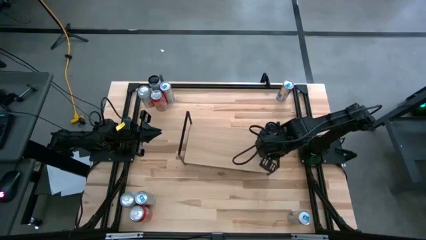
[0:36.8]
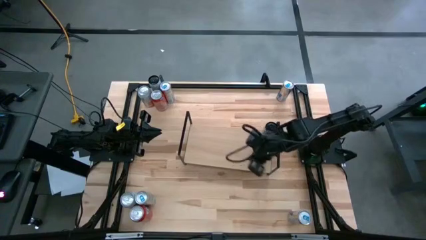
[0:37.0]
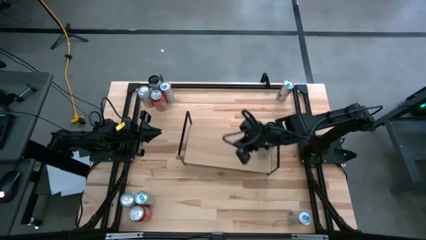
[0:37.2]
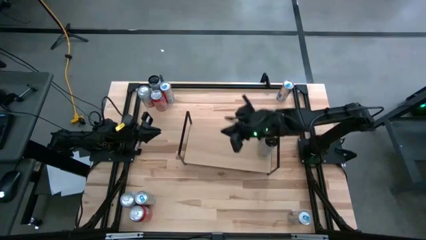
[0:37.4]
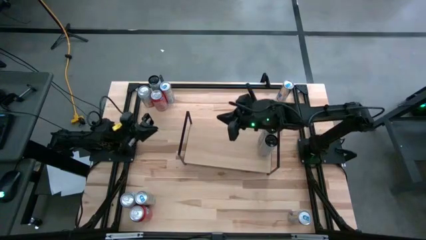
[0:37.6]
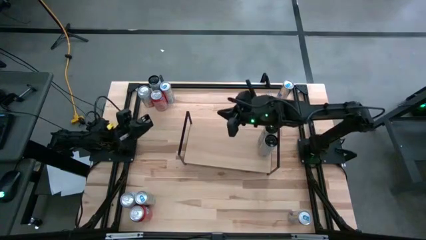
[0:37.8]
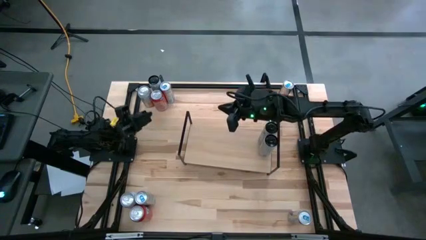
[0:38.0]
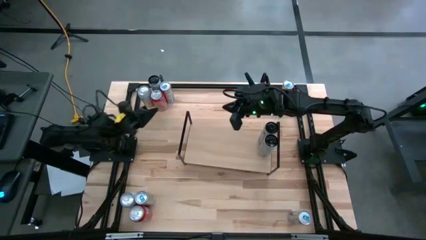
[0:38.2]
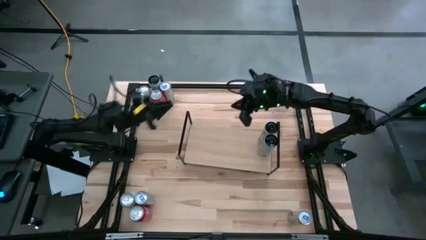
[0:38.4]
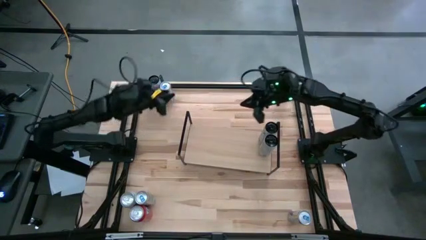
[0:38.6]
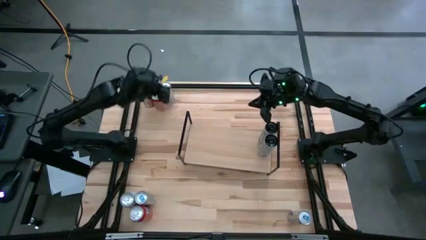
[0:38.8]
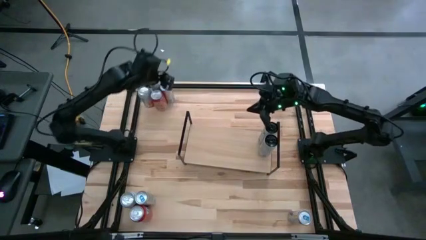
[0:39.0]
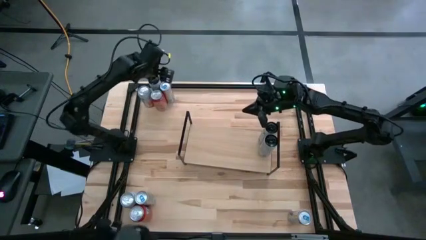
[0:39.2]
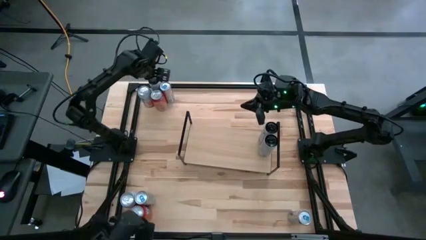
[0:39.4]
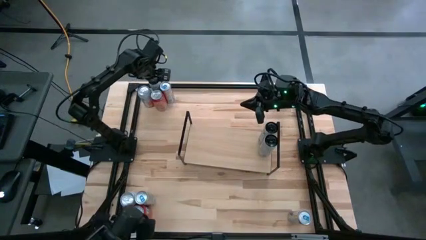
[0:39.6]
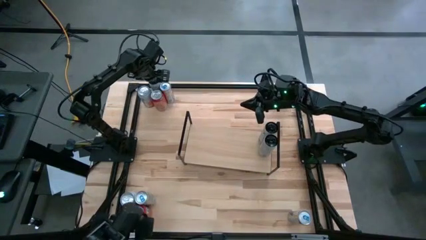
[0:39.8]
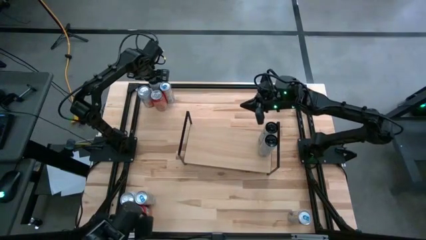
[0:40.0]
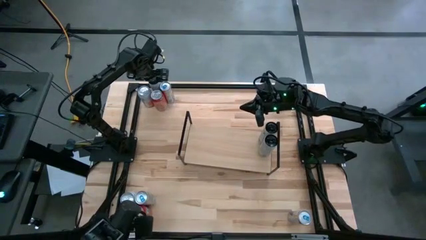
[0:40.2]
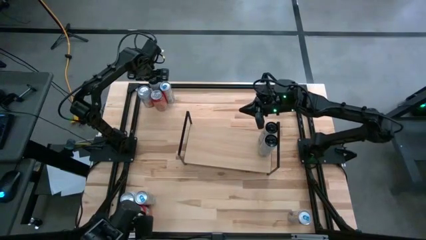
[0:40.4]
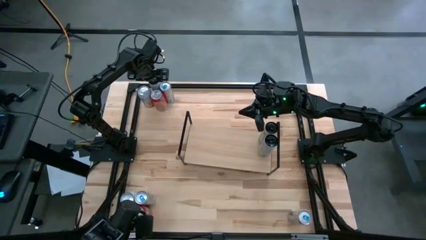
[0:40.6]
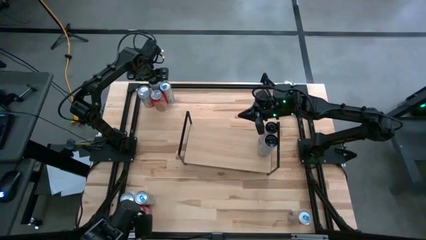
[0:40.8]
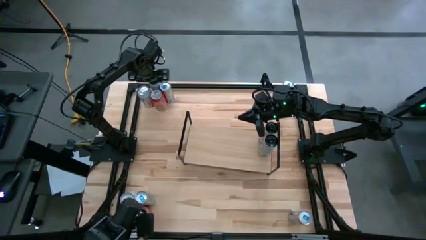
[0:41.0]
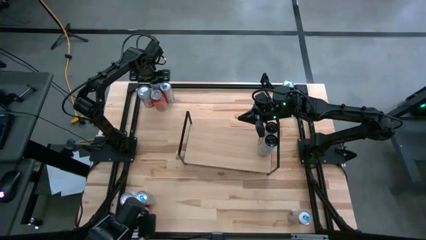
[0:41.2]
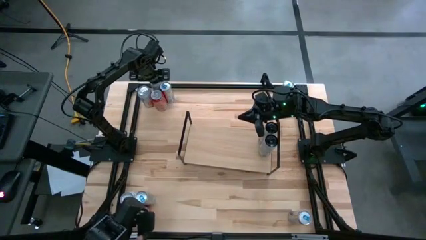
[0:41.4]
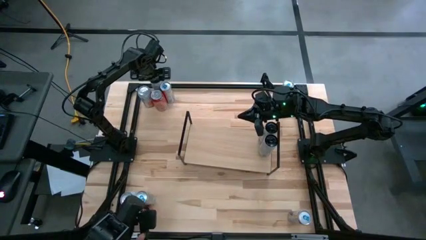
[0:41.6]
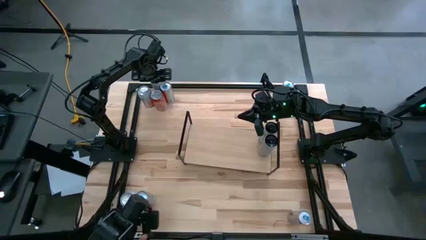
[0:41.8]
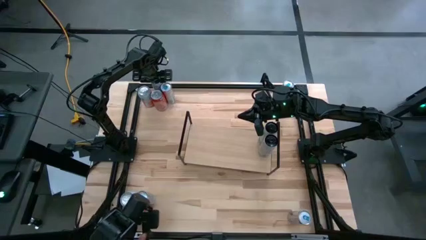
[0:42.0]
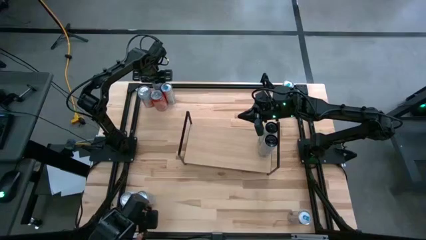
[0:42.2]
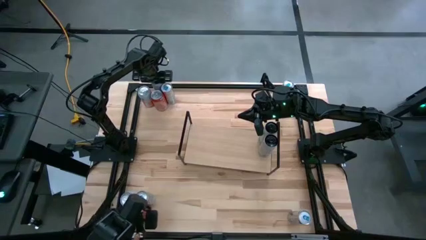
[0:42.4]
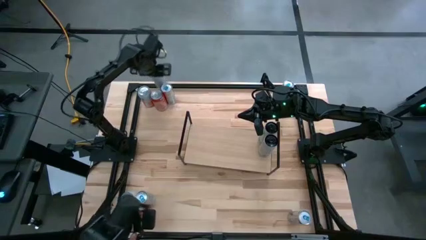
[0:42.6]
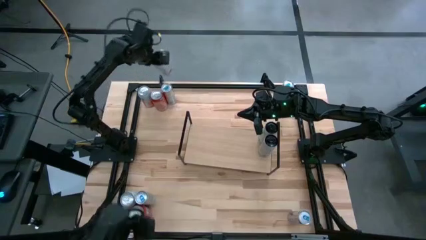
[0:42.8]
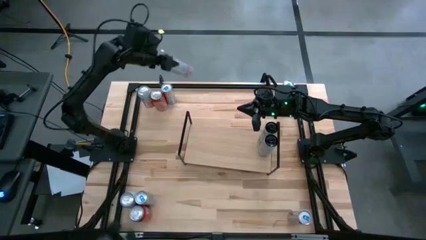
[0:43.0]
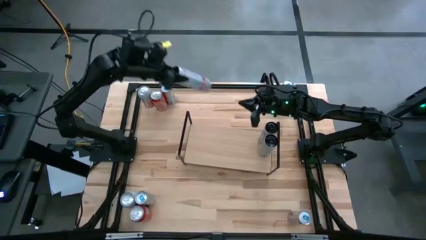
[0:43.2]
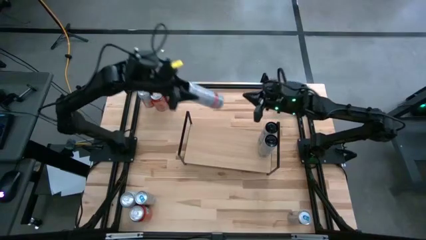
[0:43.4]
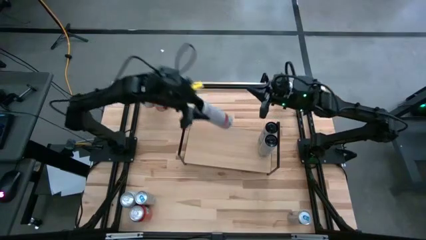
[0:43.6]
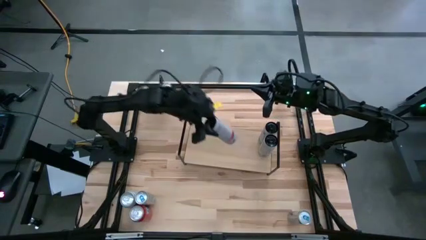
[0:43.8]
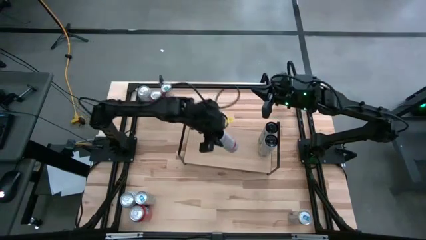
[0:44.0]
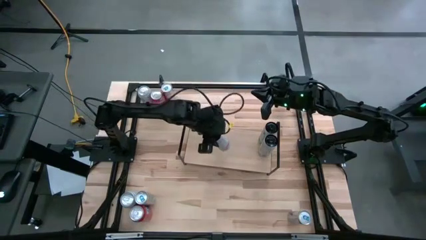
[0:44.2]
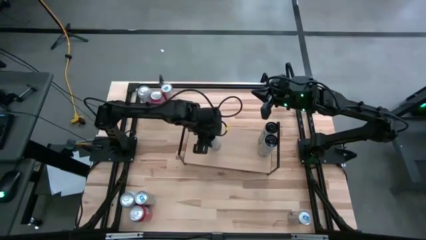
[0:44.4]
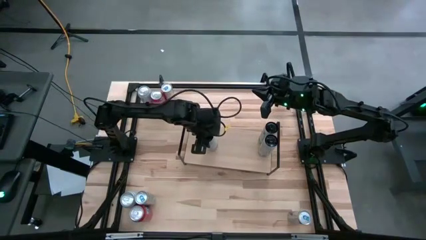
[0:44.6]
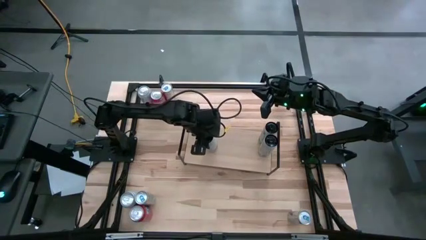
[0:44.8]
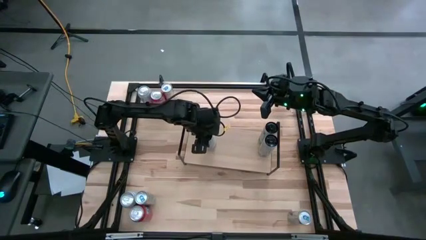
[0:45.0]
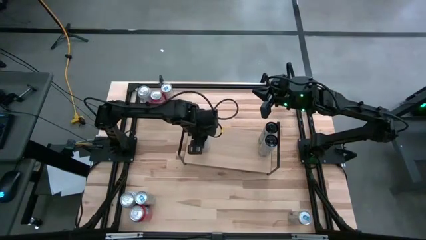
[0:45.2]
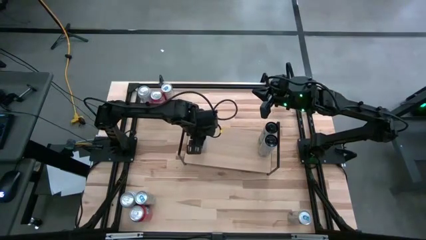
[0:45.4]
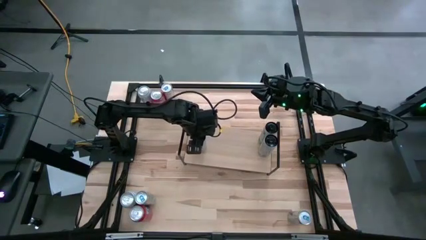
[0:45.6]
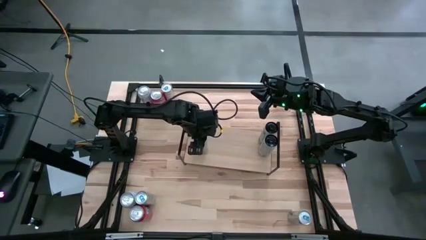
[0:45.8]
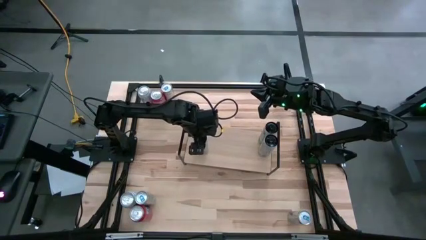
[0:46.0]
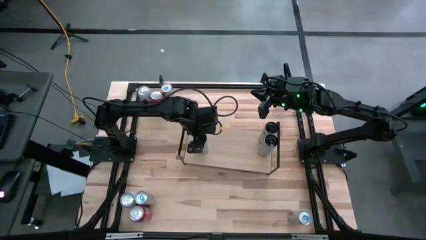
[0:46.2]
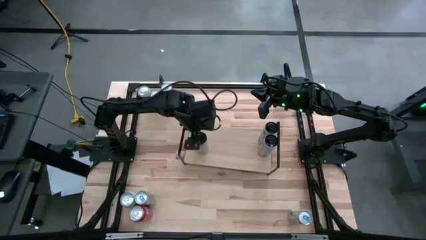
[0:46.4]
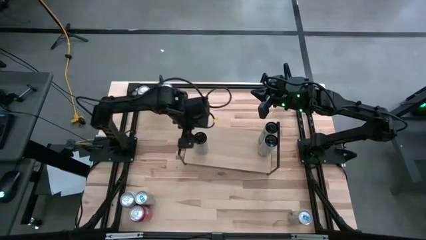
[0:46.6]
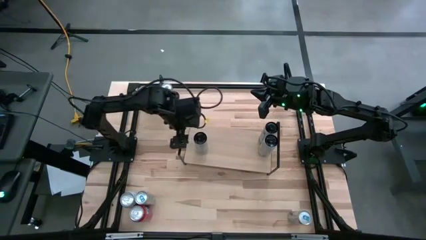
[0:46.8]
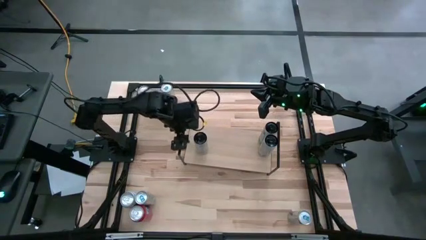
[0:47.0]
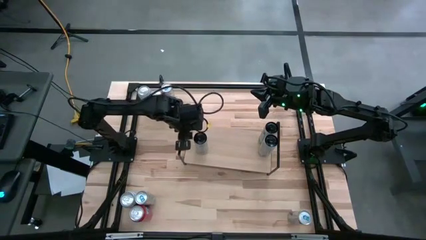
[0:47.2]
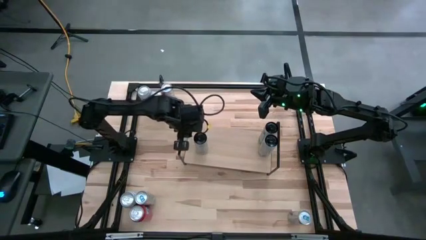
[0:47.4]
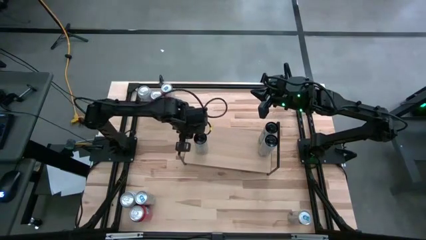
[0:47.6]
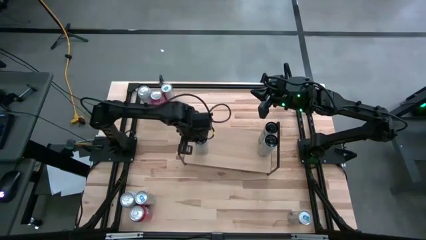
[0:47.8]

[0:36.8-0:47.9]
Task: Place canned beverage on shelf
Put the white soda can on the shelf aligned with the other white soda cans

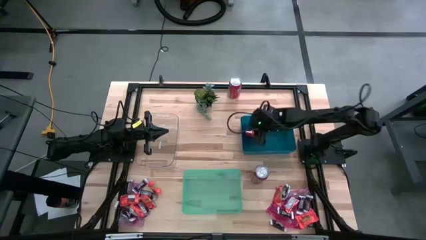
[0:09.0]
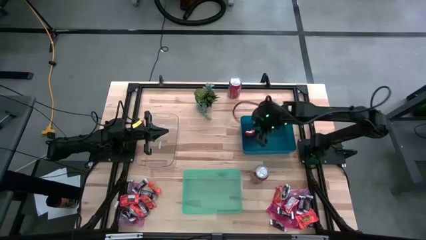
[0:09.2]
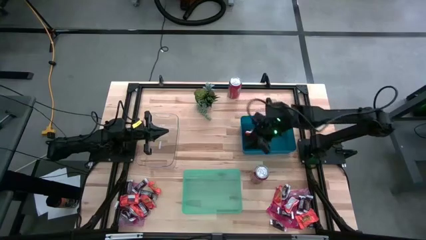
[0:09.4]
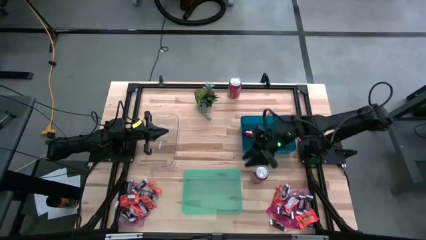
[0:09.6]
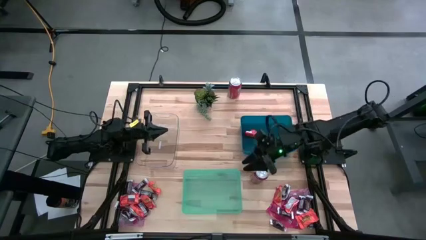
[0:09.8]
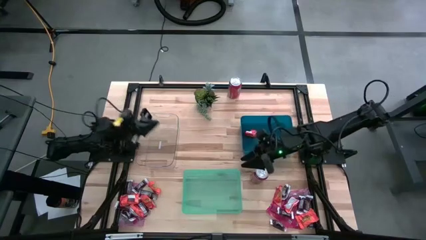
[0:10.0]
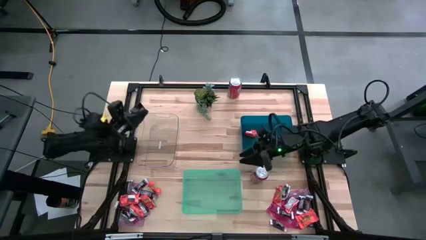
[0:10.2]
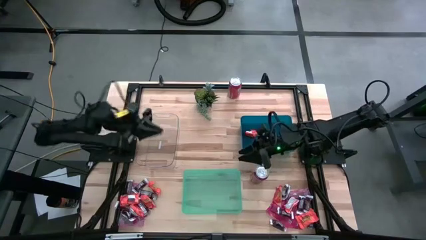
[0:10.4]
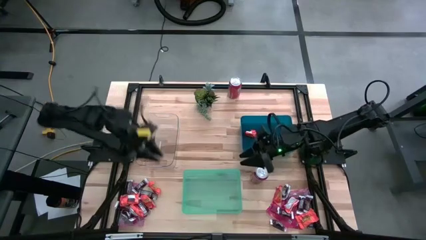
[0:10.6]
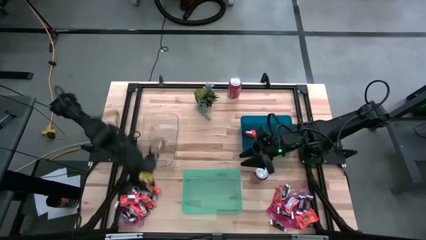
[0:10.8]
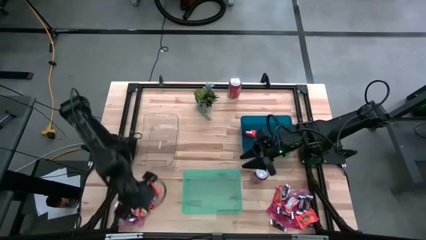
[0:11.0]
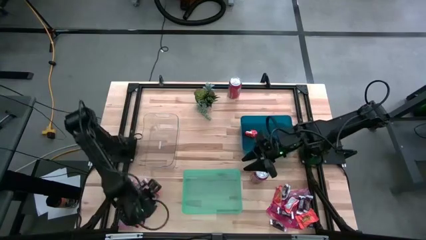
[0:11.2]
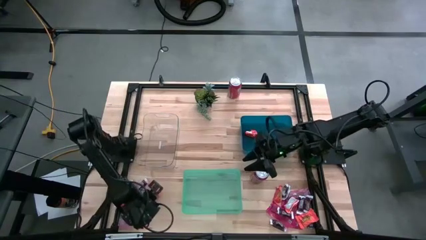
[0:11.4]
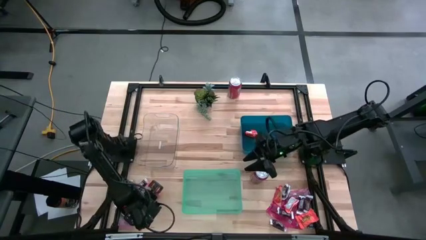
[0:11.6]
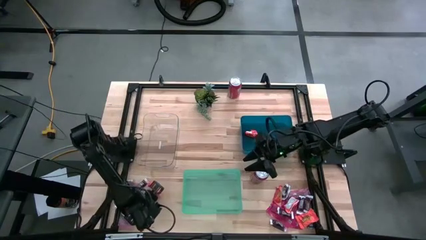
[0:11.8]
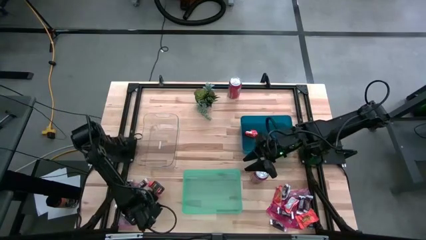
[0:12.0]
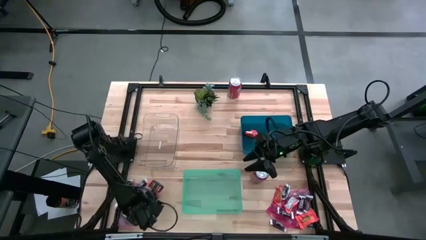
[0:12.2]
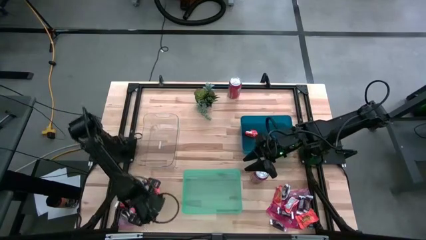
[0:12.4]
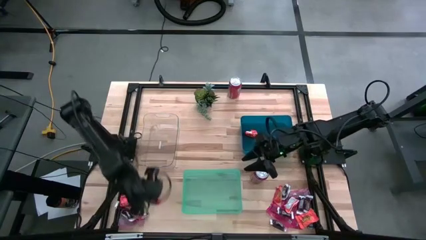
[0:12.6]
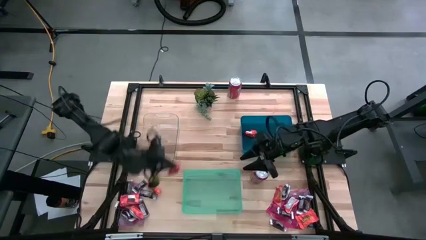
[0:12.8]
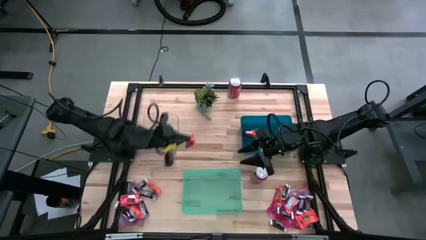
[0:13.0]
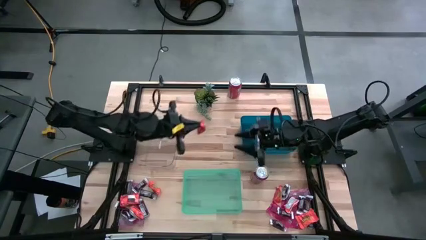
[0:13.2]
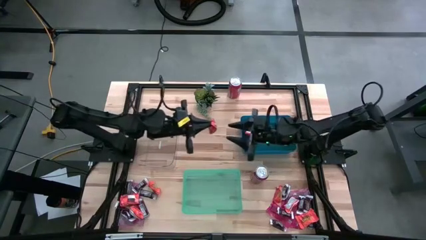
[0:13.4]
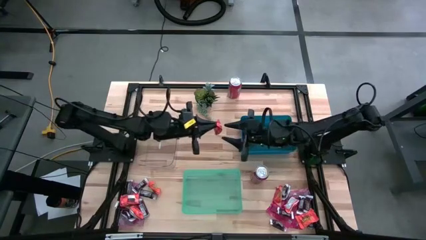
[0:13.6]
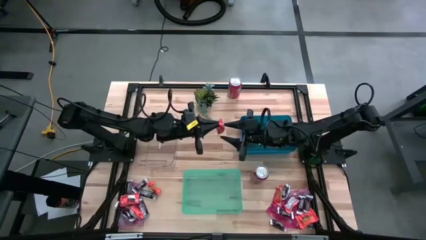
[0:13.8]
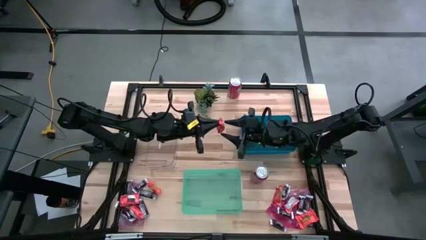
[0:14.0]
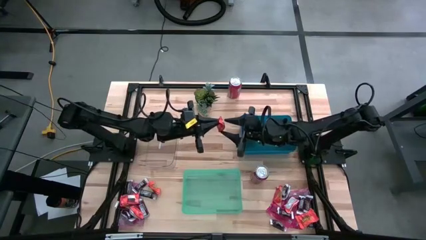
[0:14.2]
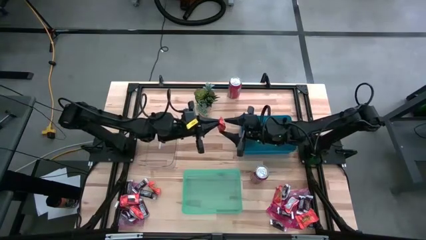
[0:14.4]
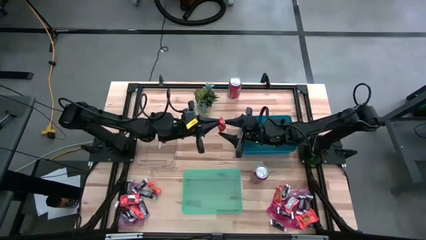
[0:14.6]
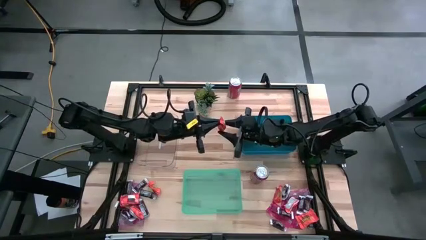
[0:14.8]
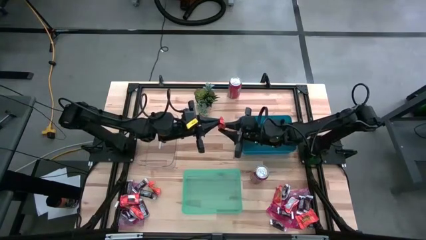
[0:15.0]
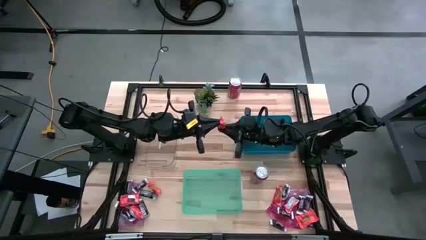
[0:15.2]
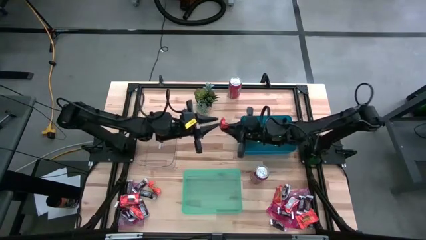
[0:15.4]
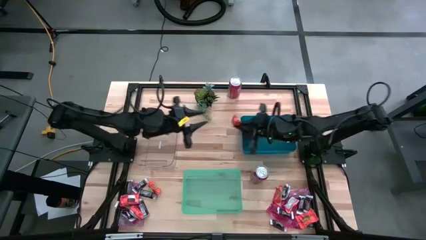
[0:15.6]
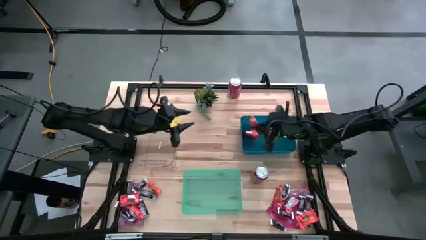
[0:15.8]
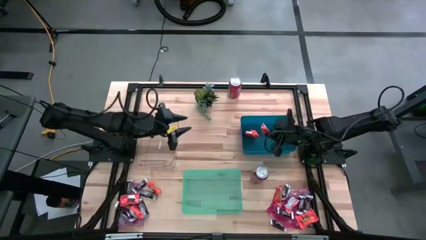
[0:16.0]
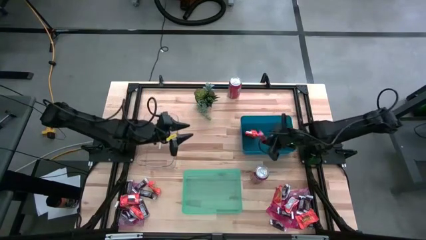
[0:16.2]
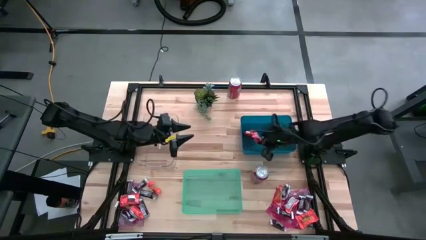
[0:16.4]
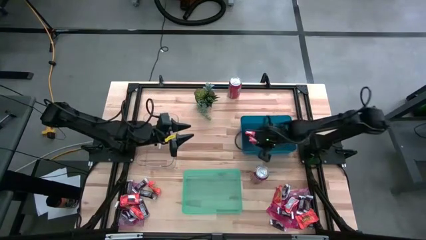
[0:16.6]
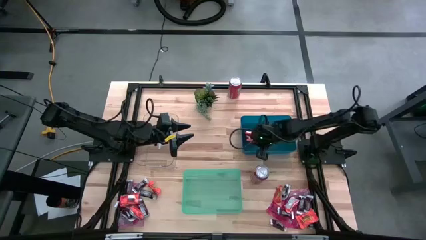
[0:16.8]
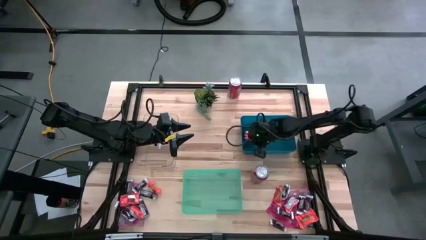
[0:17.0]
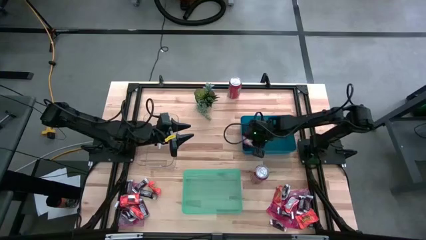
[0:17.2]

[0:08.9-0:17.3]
Task: Sort candy
Put the orange chocolate into the blue bin
